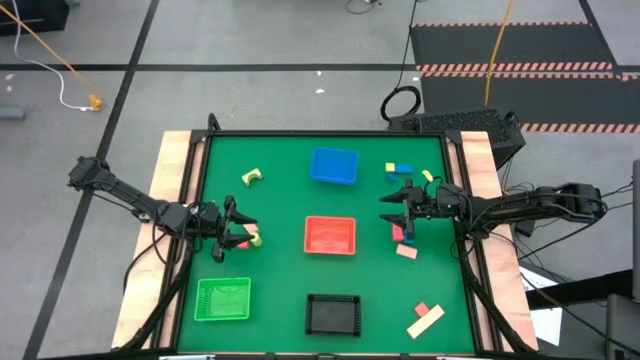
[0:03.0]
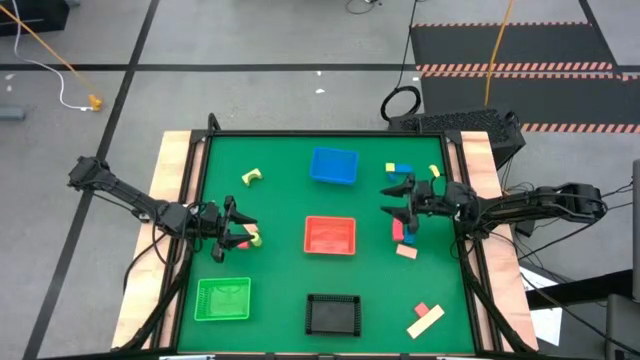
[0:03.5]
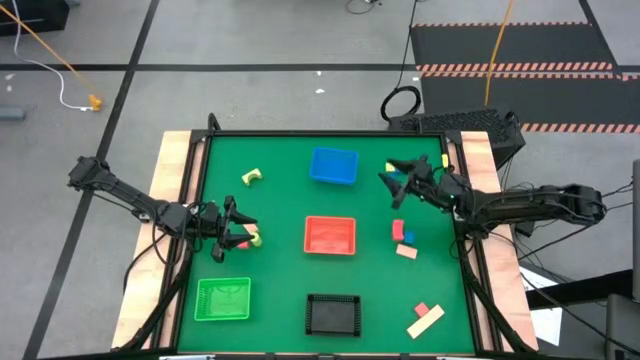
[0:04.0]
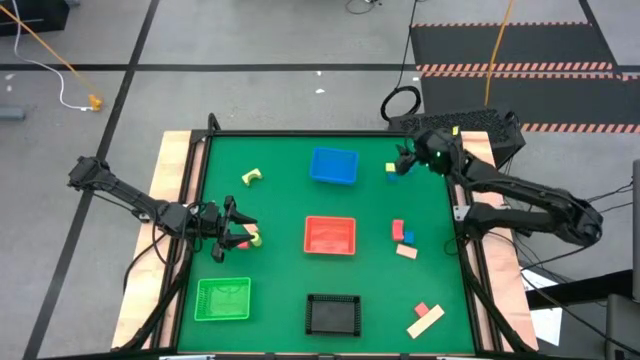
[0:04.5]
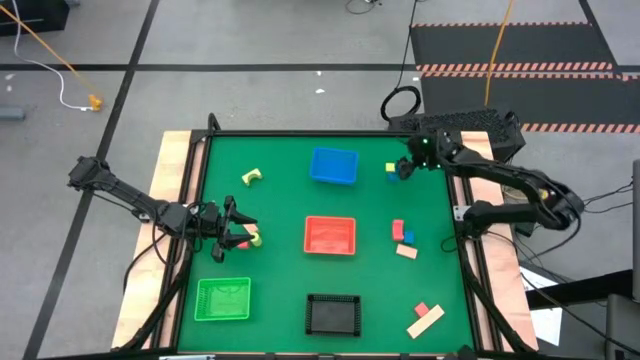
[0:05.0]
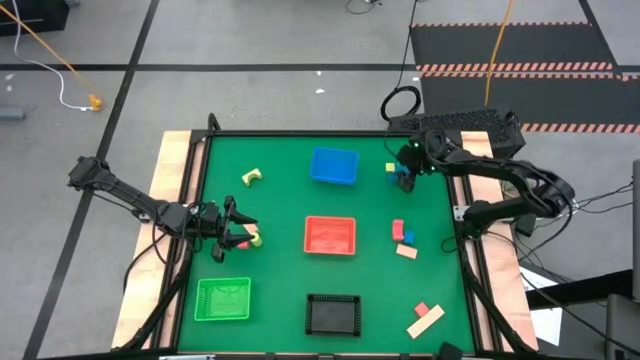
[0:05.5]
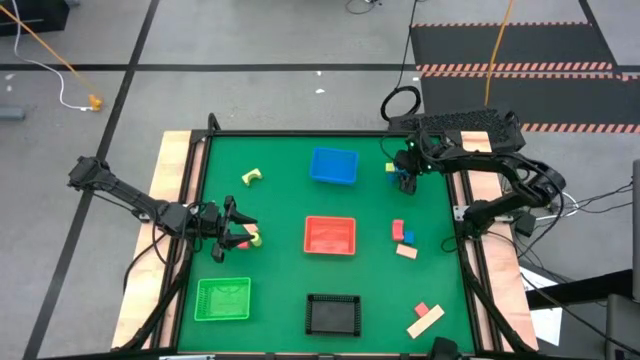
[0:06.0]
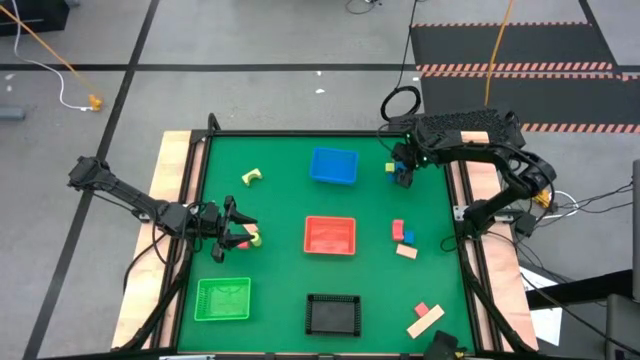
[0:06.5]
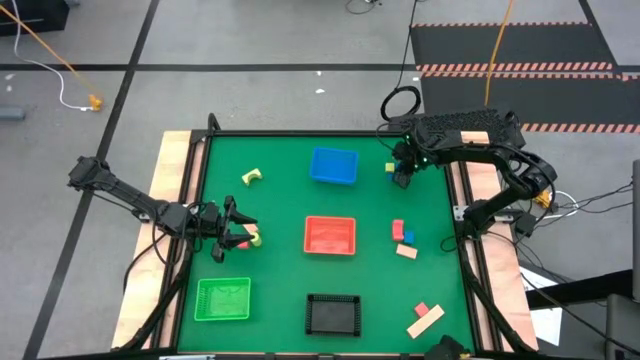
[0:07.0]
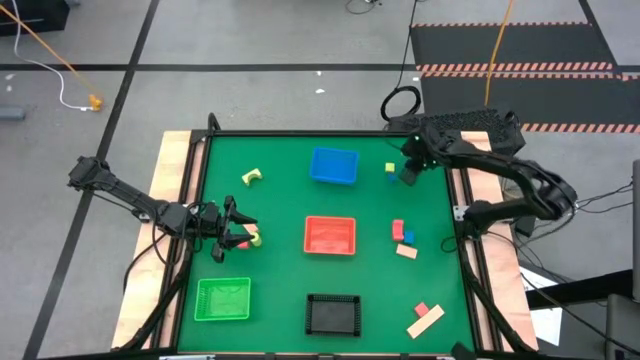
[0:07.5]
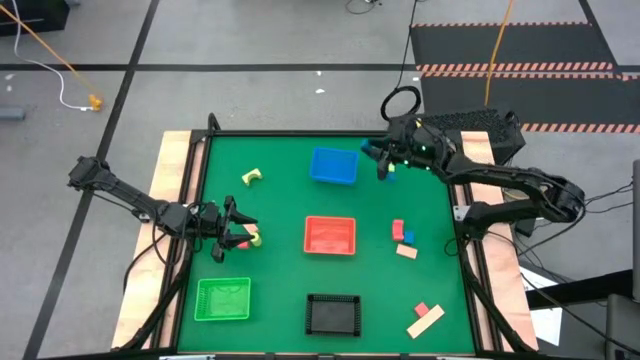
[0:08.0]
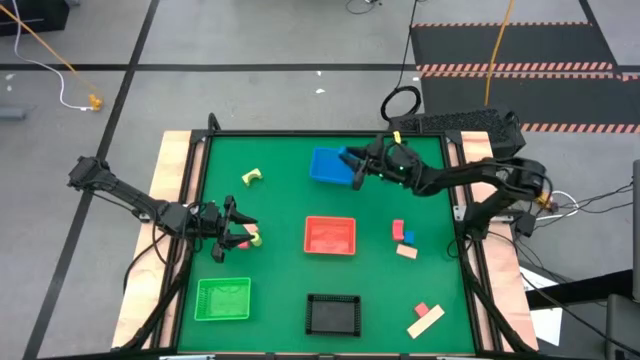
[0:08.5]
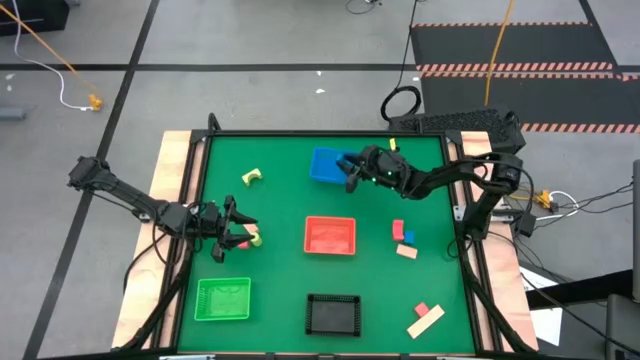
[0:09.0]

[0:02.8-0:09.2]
Task: Sort & place blocks by color
Put the top right blue block into the blue bin

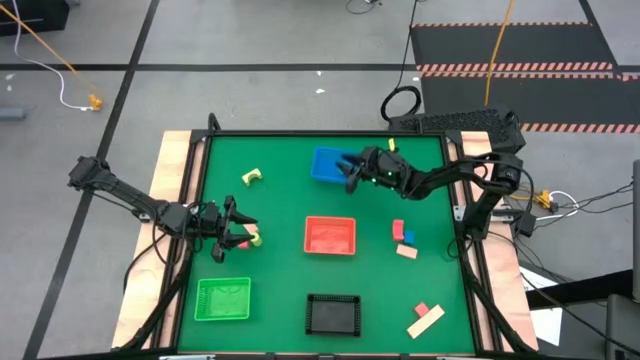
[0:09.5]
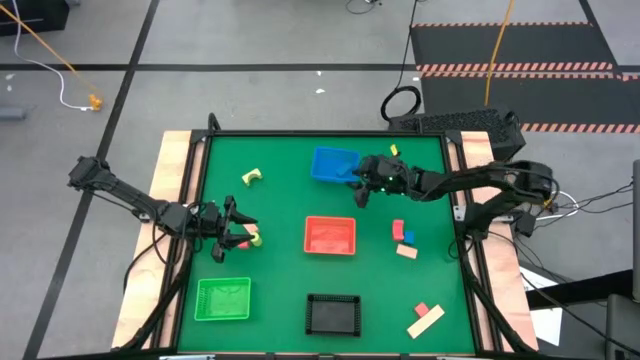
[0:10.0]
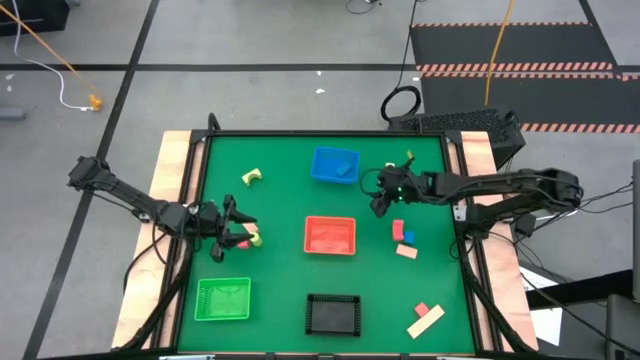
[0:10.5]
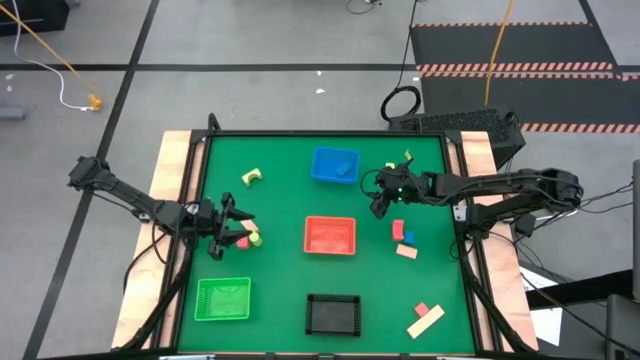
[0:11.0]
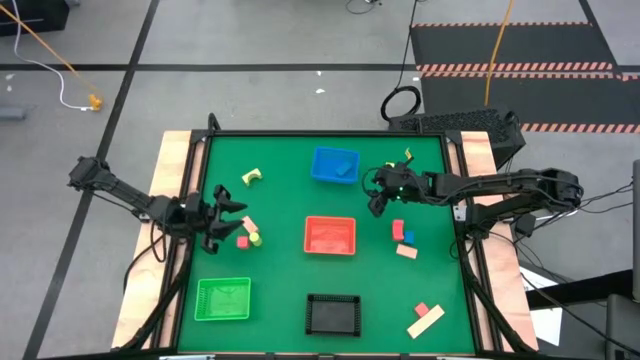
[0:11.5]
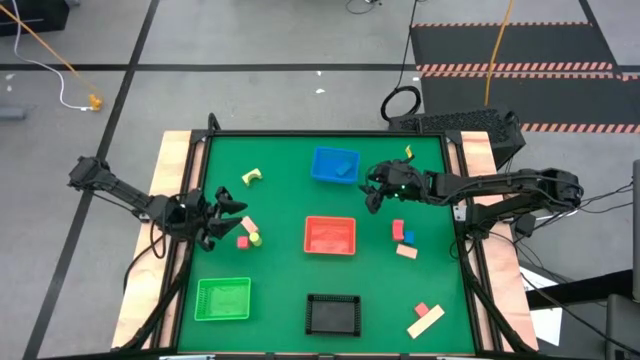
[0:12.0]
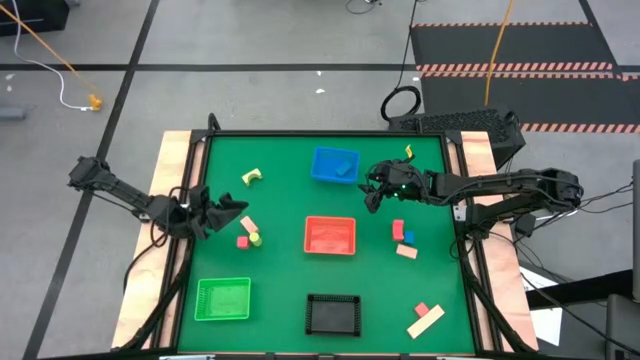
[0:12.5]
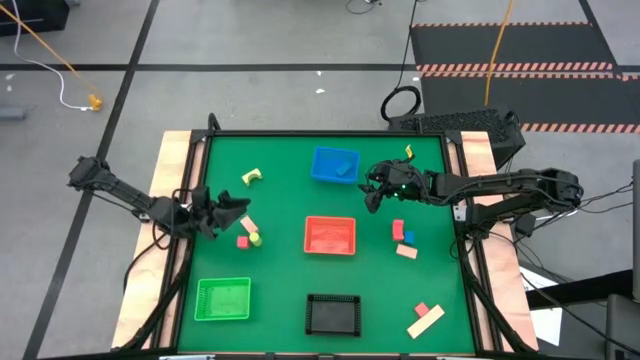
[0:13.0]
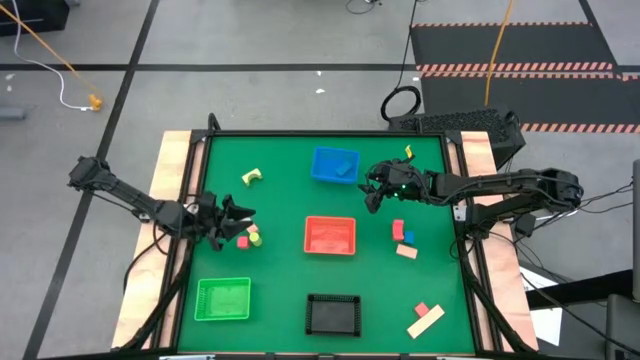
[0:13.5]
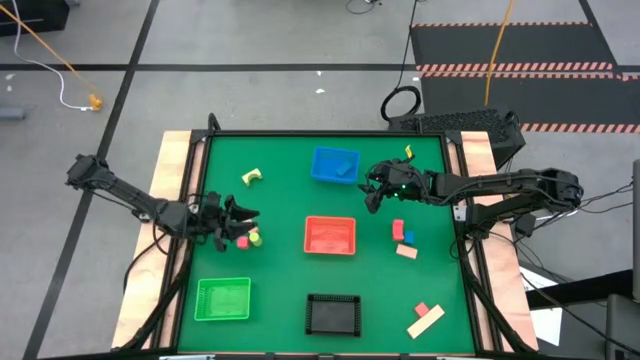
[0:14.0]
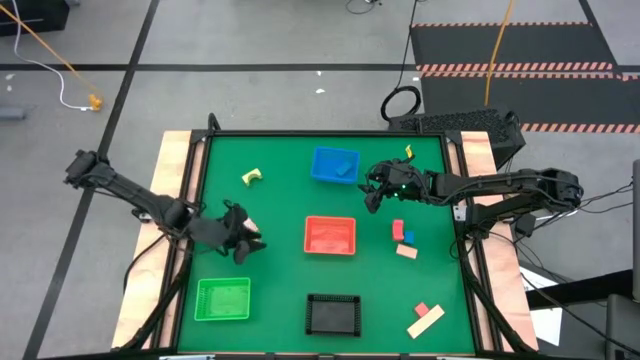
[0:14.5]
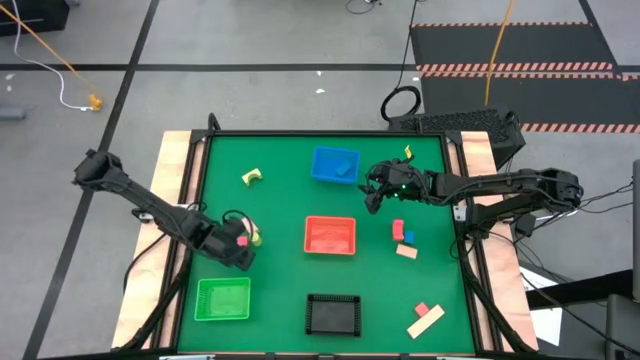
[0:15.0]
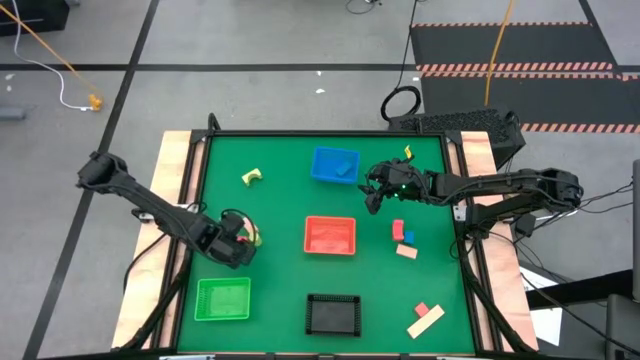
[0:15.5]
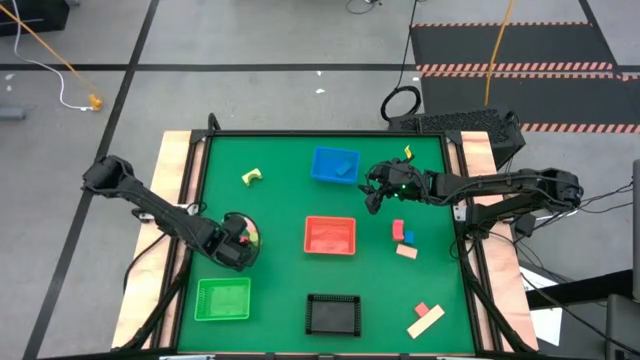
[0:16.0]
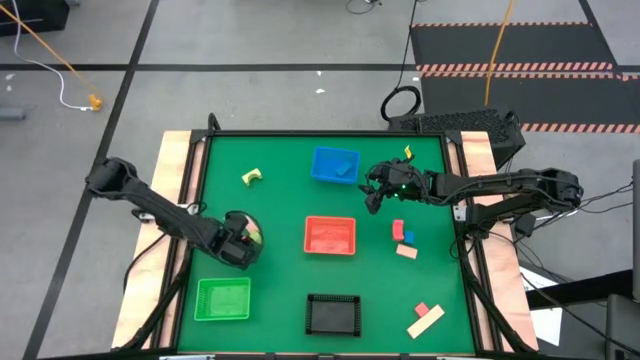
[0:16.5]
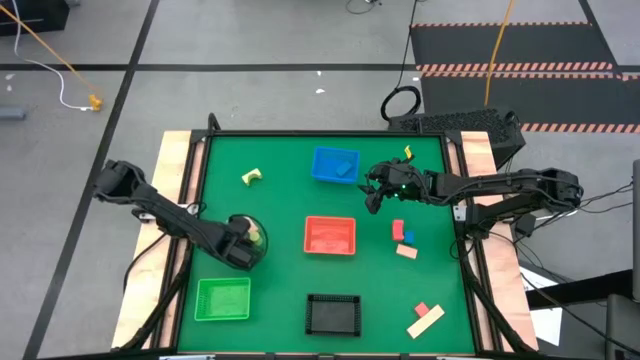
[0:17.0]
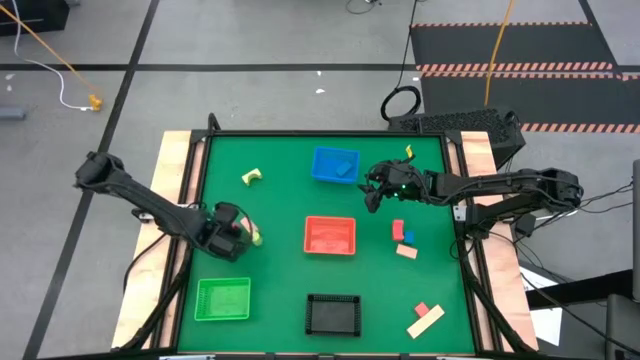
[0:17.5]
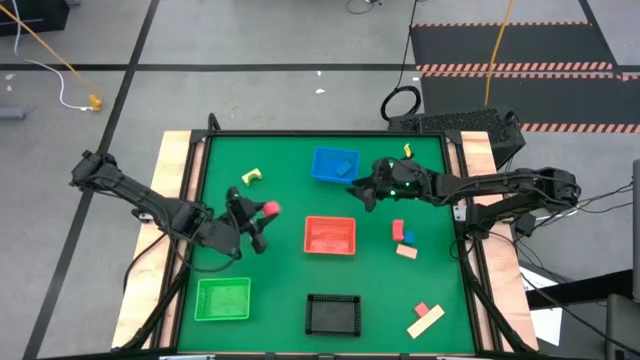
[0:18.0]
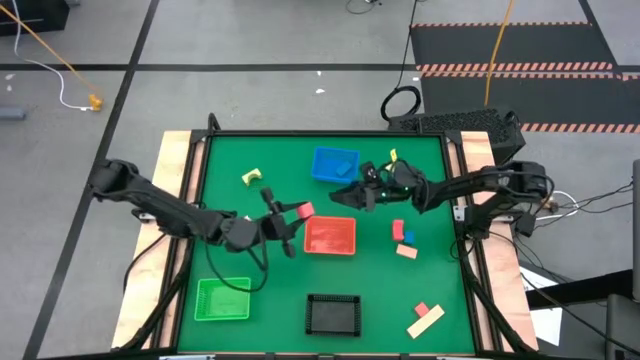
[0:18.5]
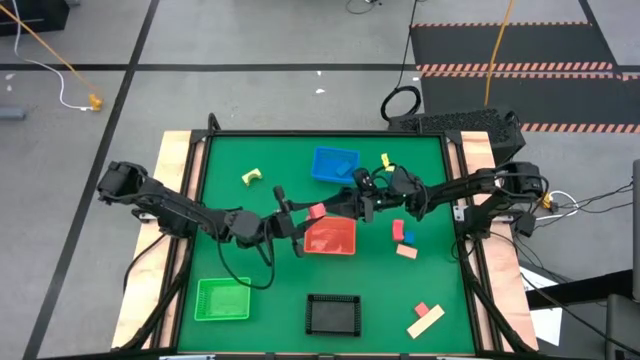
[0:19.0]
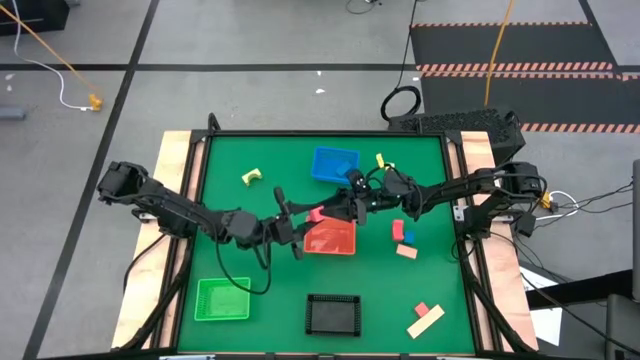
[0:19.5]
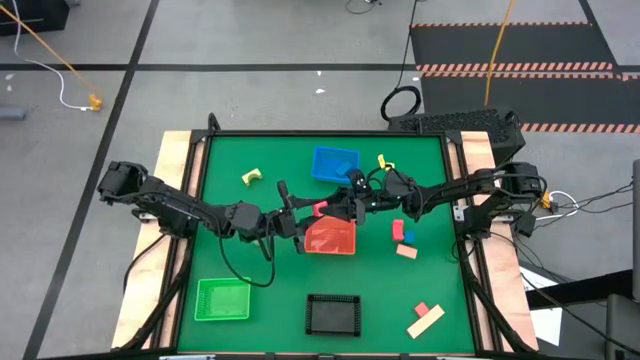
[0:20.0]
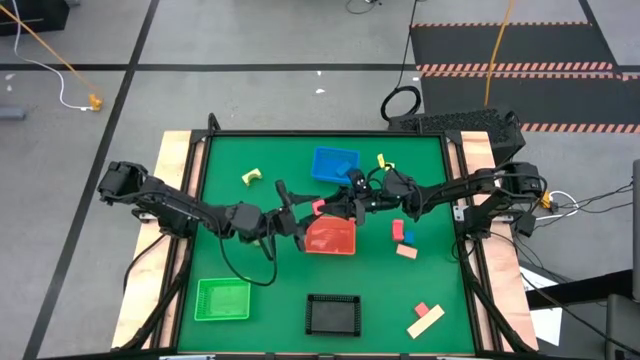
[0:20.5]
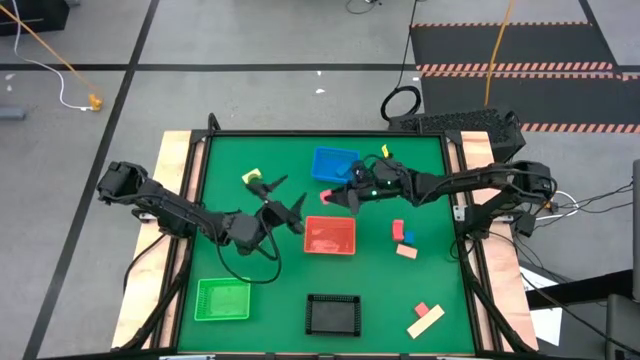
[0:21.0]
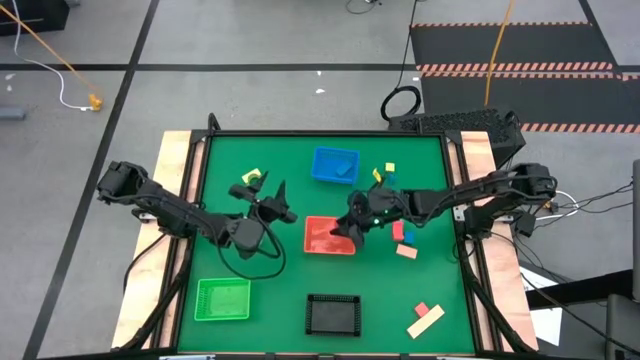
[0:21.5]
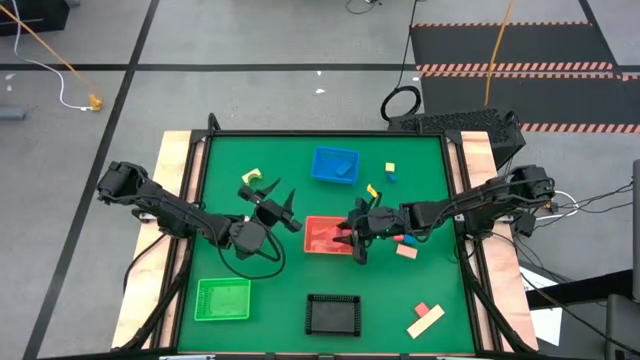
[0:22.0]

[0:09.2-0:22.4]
Put the top left orange block into the orange bin

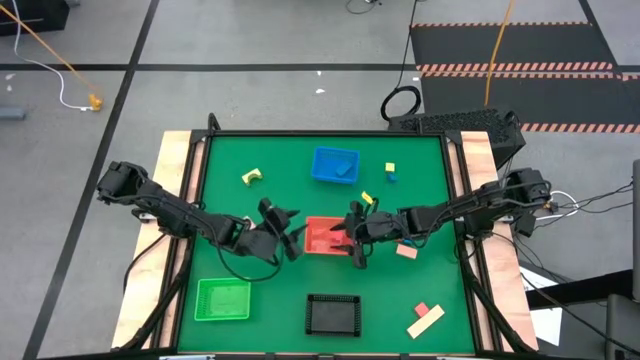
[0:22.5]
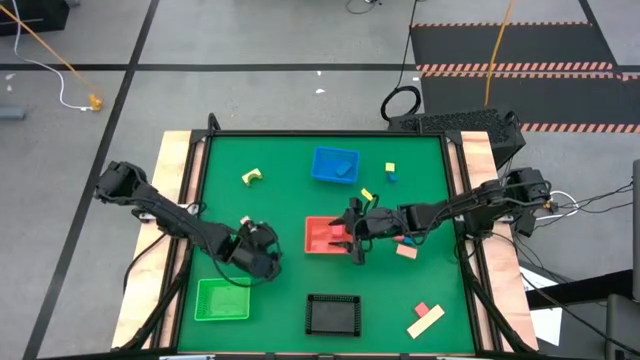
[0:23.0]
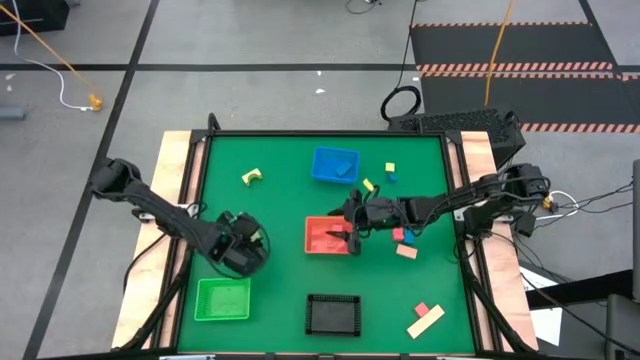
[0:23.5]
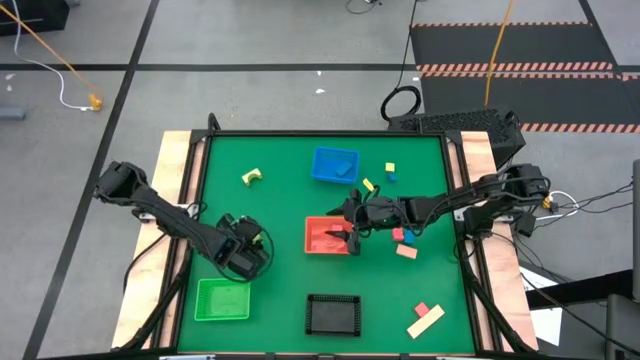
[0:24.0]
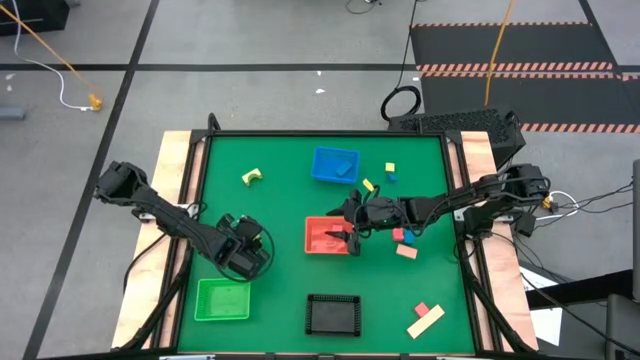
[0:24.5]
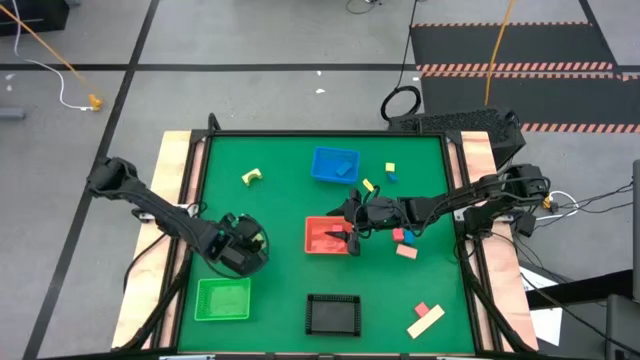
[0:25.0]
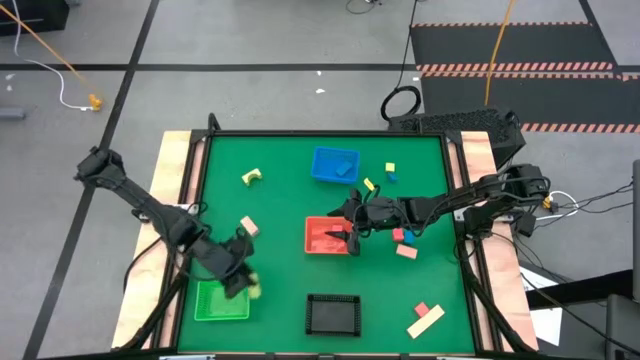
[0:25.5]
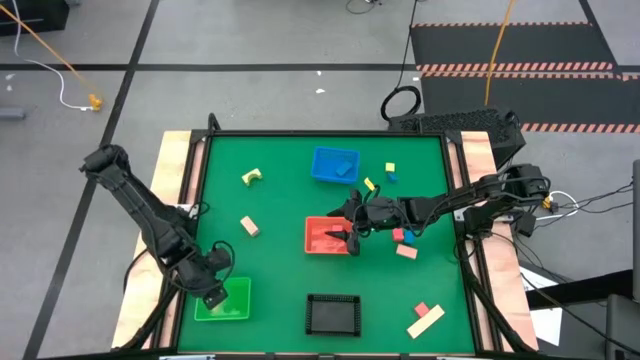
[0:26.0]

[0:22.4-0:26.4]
Put the bottom green block into the green bin
